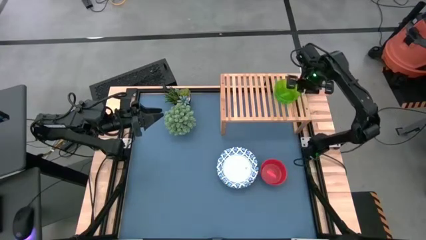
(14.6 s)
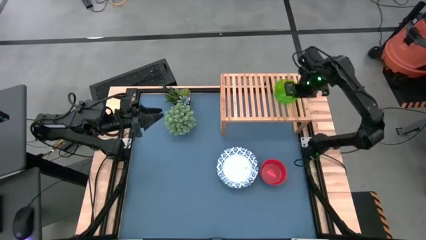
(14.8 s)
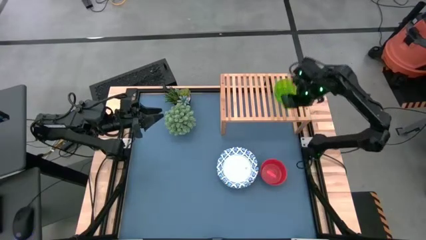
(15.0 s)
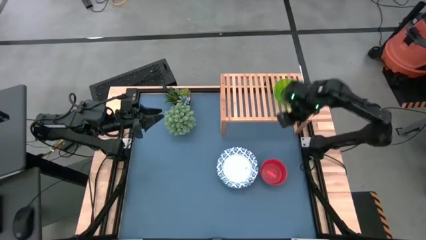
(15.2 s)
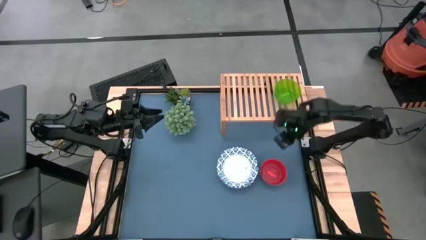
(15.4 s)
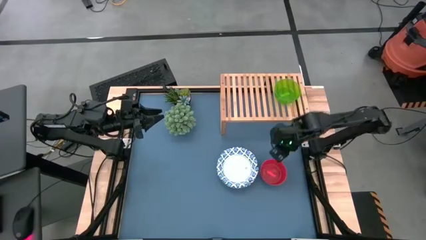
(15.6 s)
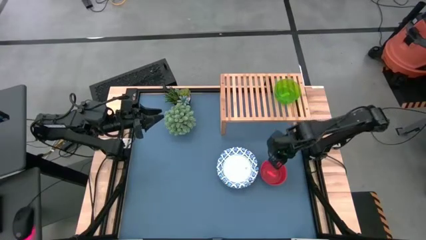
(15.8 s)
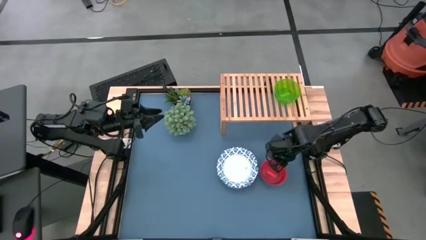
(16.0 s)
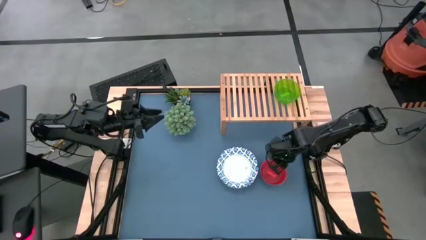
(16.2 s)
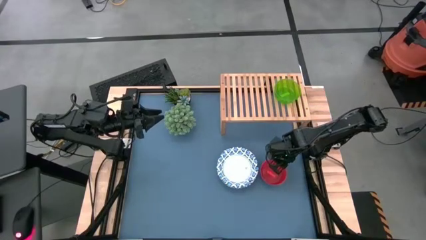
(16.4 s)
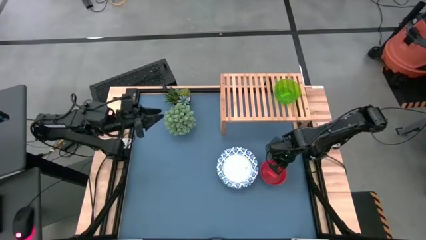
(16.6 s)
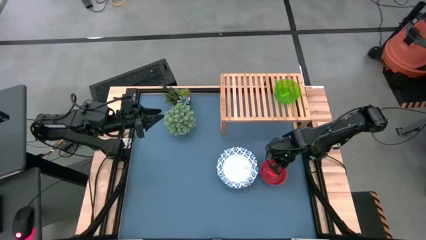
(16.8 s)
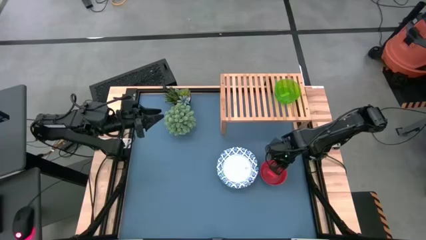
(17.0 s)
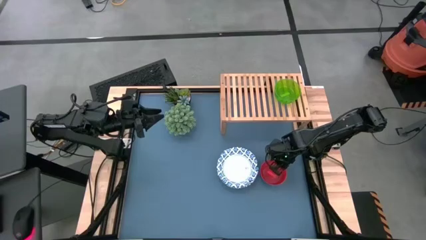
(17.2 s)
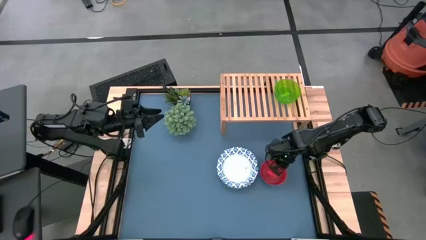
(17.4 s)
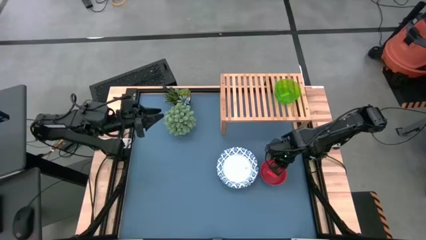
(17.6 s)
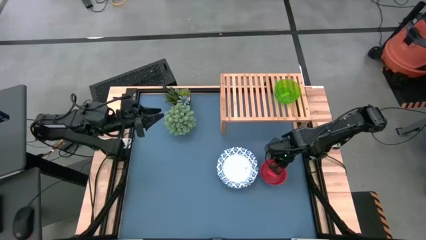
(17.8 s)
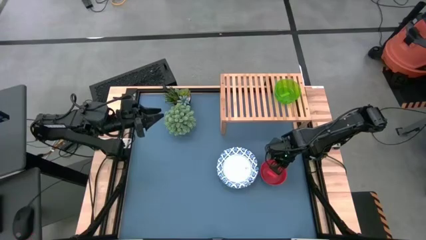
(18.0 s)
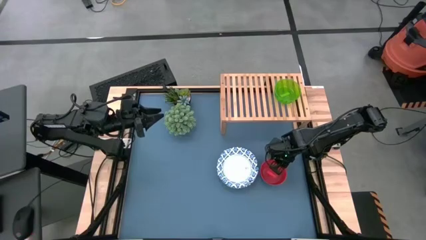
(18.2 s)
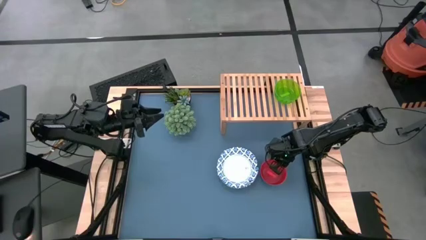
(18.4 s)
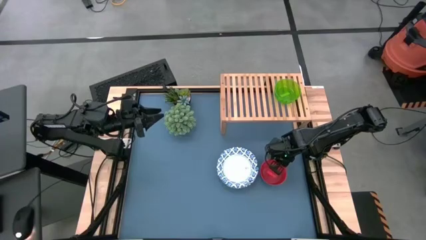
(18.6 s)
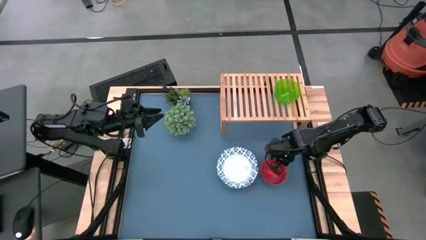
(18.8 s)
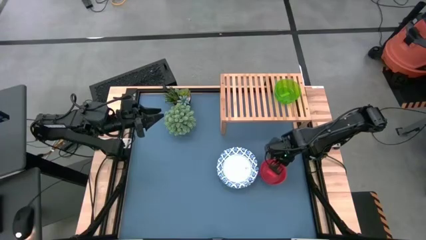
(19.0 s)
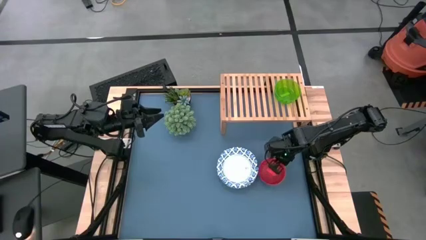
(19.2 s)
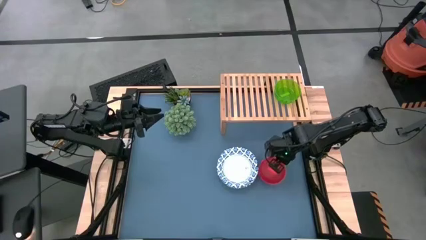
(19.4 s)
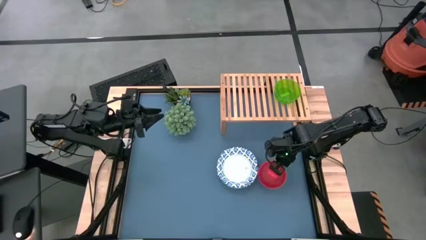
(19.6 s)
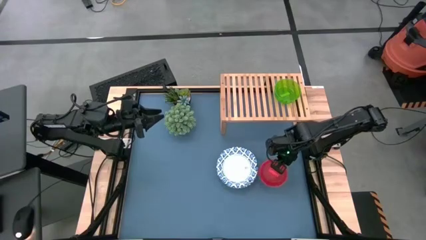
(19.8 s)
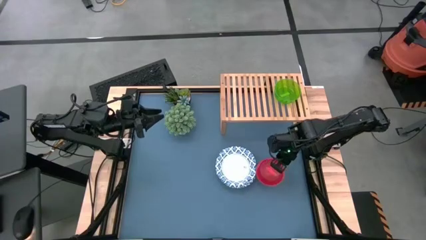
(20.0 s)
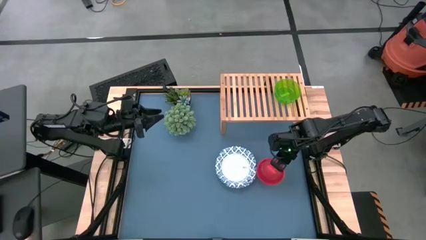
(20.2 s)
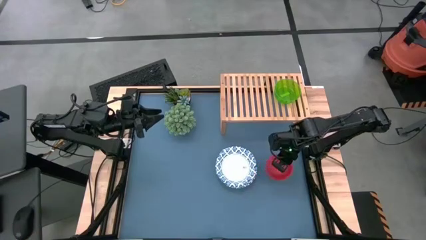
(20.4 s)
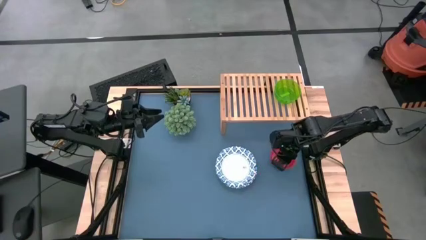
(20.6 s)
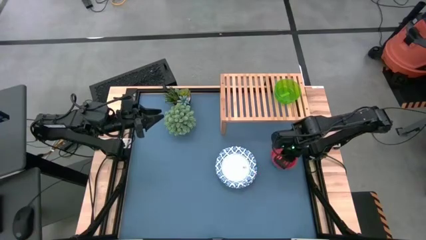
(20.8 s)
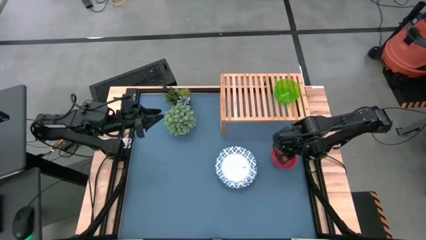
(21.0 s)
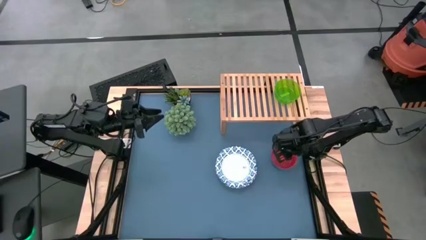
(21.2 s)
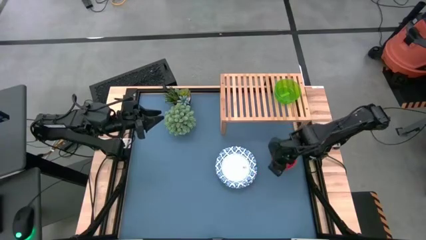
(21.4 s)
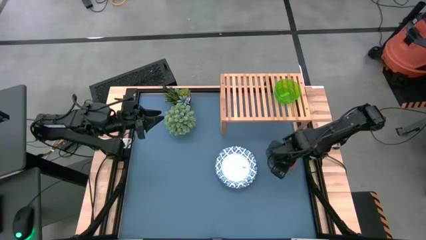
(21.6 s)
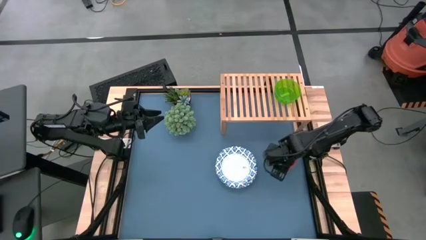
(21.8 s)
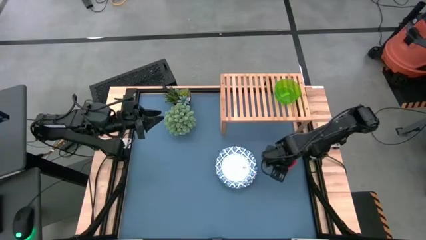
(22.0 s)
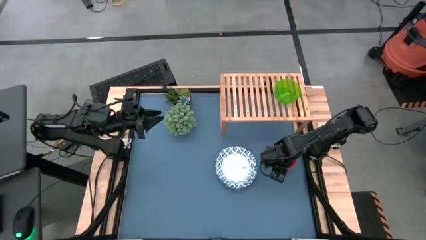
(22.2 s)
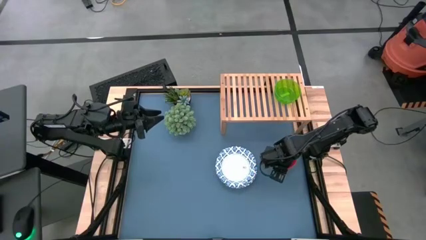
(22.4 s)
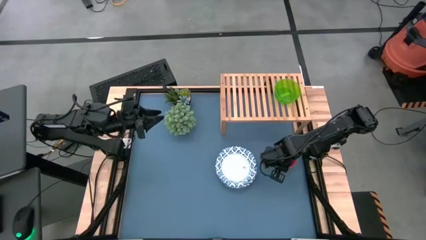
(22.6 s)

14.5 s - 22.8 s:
Task: Place and stack bowls onto a shelf
Stack the red bowl on top of the green bowl on the shelf

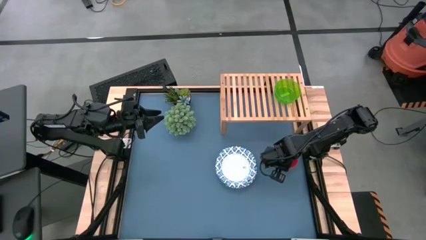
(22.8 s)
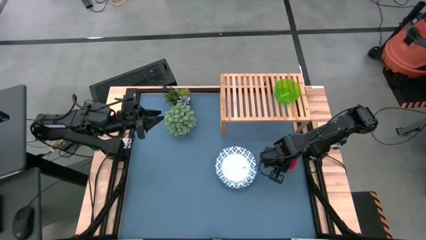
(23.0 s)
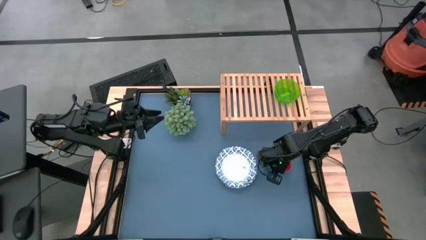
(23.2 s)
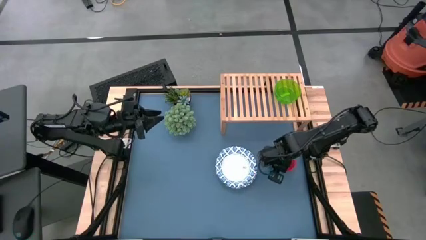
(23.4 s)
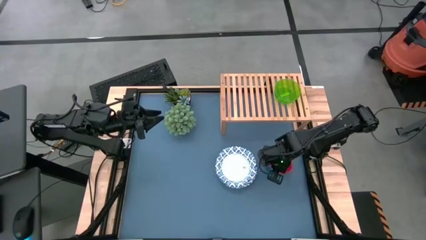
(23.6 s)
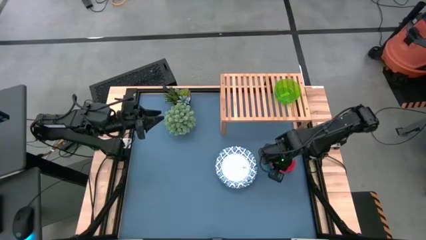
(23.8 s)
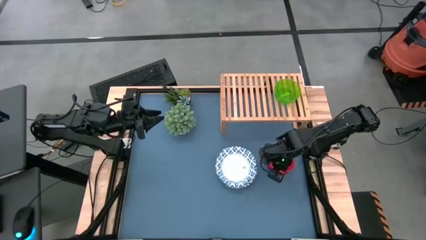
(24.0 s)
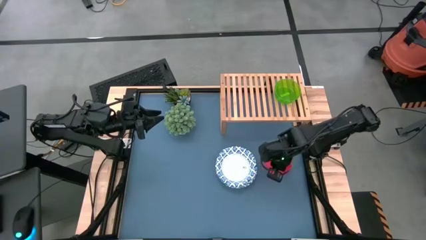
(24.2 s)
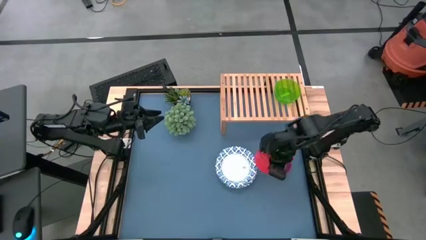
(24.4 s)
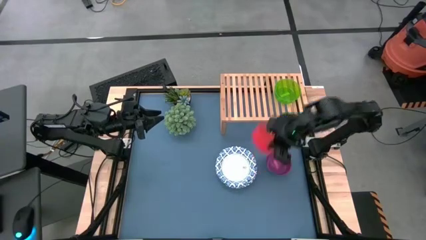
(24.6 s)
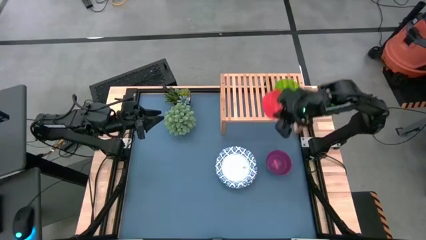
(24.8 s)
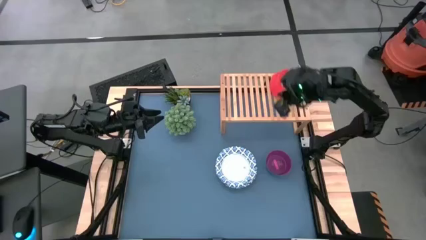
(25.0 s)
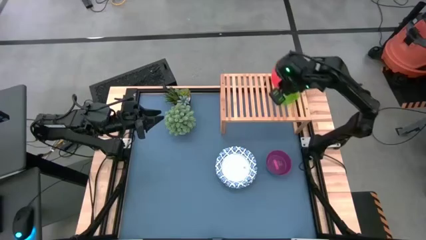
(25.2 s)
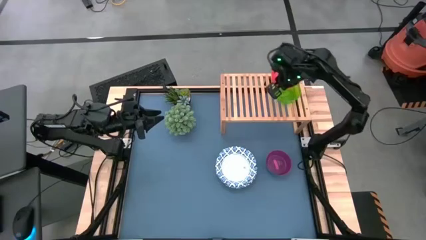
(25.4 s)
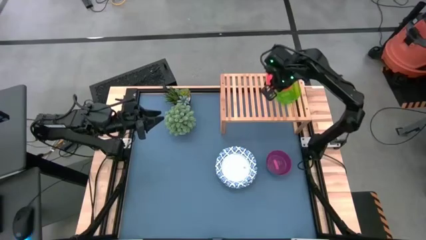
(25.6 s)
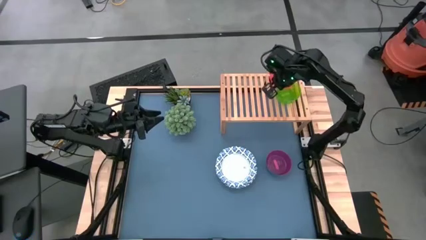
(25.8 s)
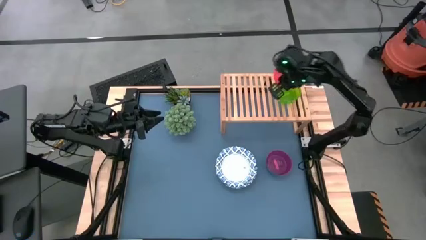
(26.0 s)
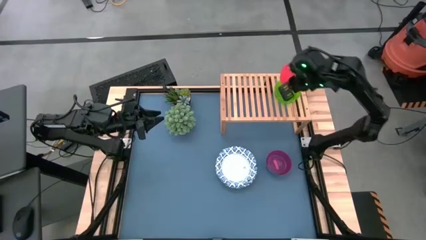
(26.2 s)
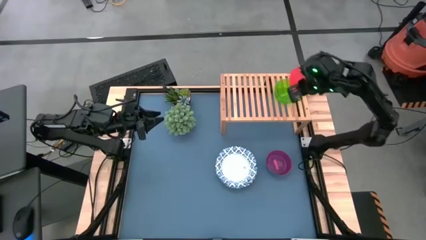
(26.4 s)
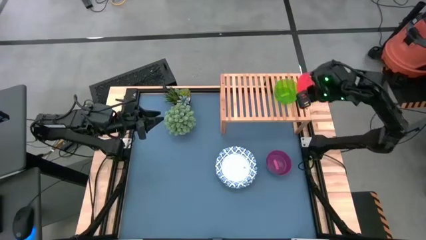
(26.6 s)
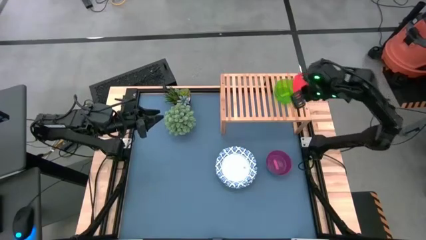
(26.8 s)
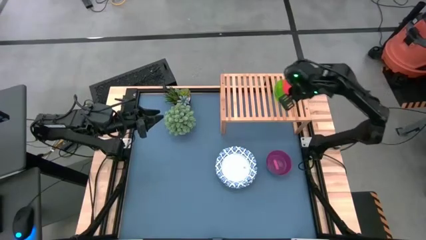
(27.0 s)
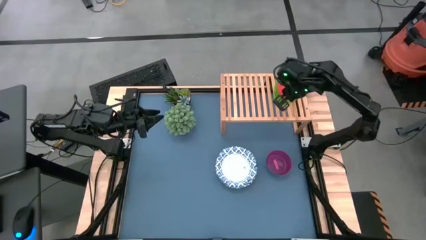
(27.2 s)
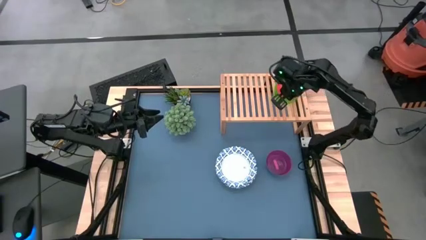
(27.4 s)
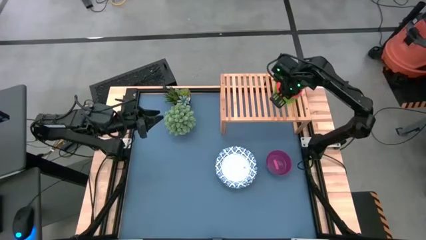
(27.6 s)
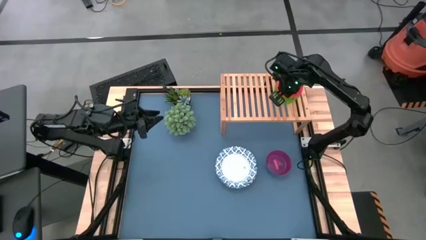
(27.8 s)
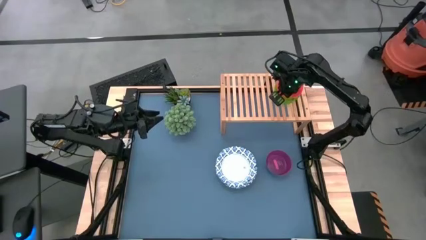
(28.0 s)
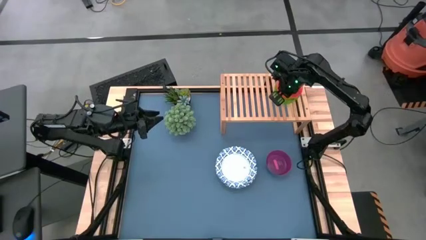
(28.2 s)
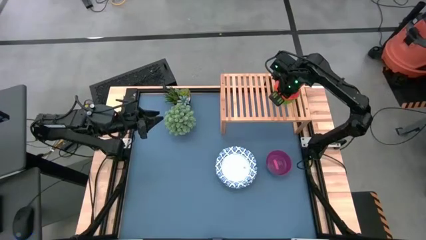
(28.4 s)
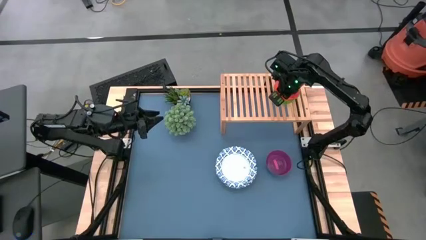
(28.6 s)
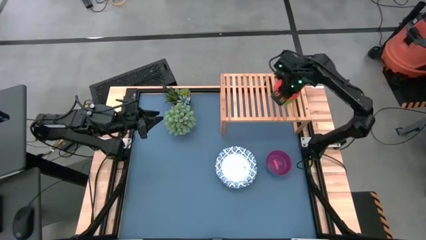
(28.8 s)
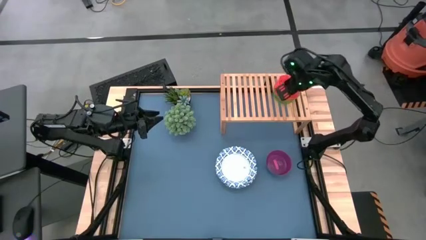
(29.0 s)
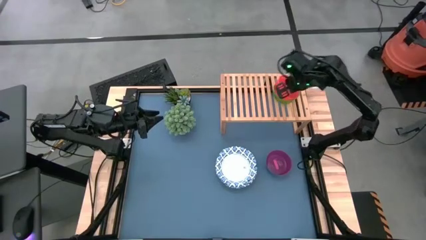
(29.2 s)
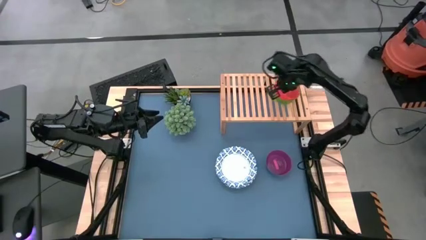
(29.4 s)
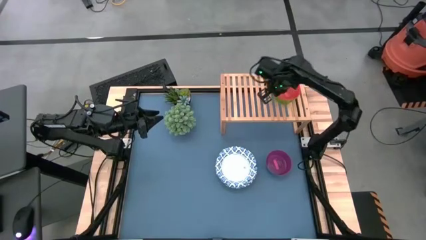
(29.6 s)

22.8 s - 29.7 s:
Stack the red bowl on top of the green bowl on the shelf

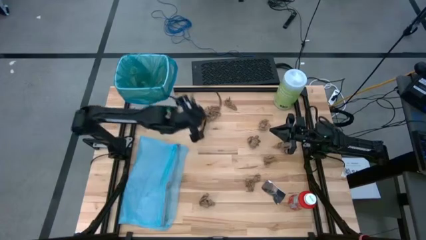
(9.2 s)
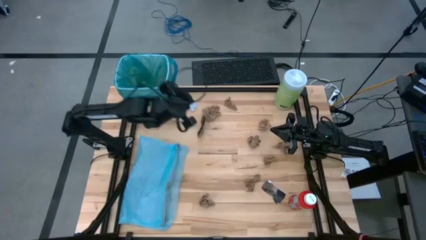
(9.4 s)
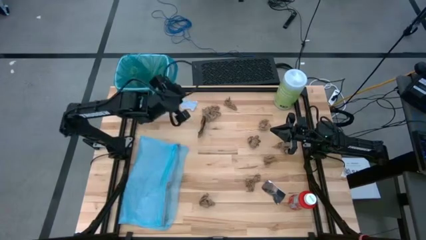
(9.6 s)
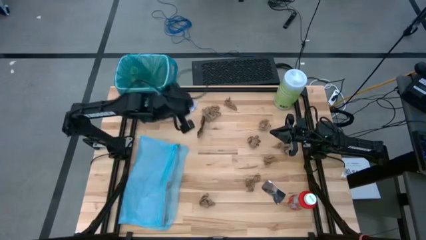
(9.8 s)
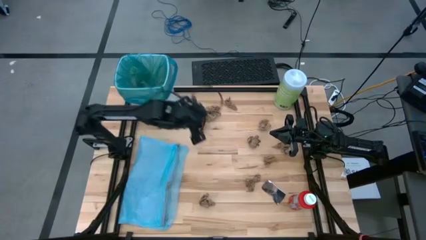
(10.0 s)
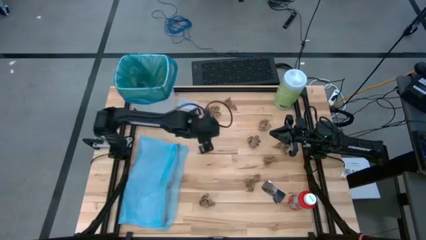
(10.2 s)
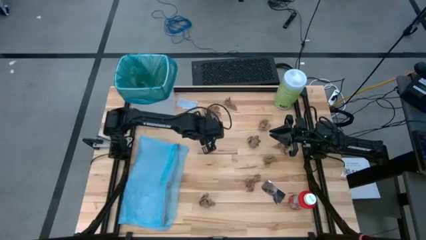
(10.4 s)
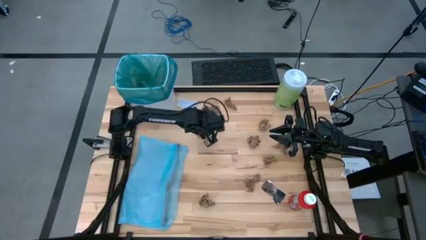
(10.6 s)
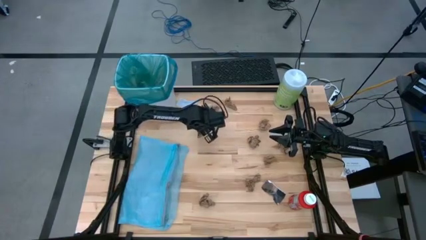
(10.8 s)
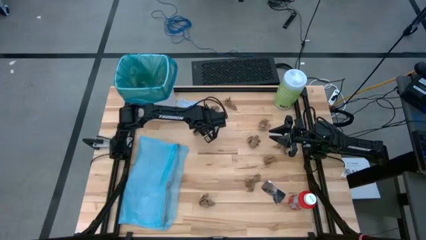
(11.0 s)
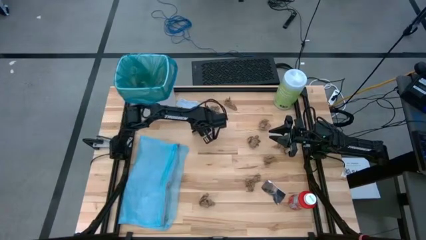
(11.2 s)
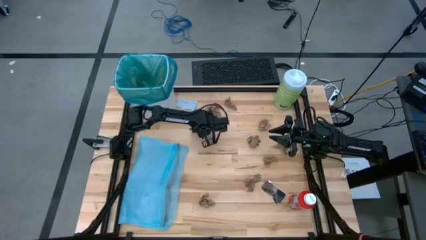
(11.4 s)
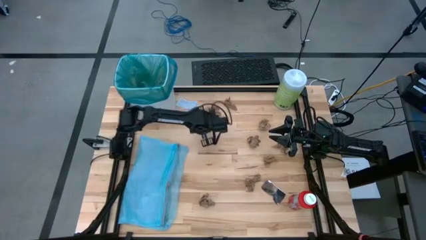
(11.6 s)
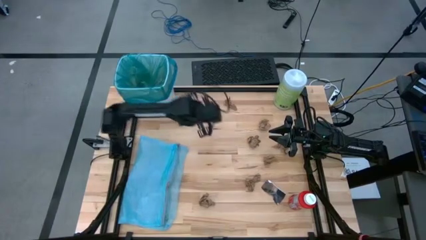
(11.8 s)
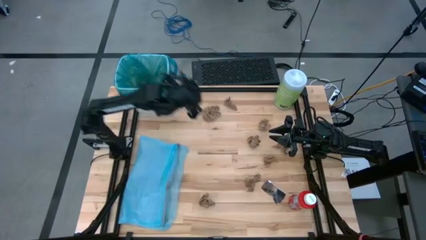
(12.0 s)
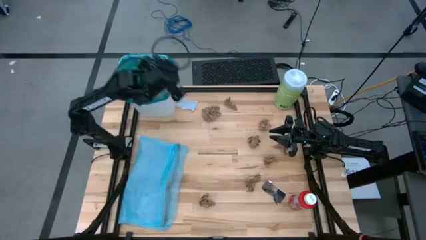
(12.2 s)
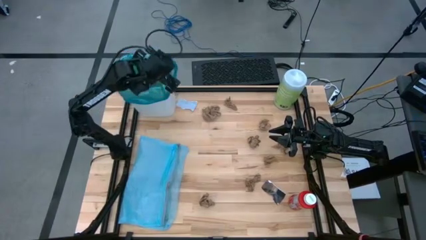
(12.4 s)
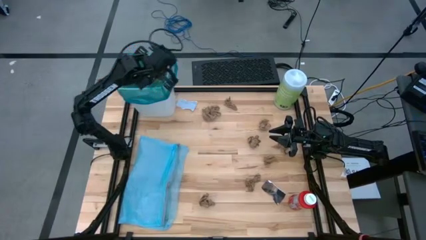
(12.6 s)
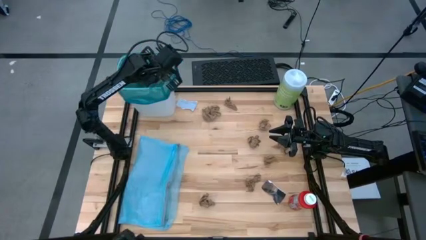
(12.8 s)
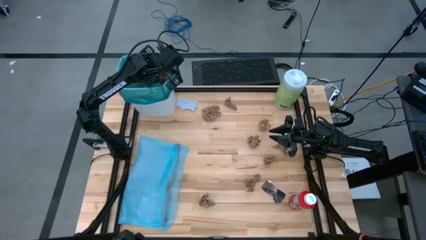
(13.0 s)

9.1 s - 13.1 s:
Task: place trash/remove bag and relplace
Put the brown cardboard paper into the blue trash bag inside the white trash bin
